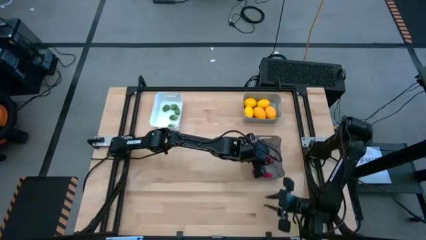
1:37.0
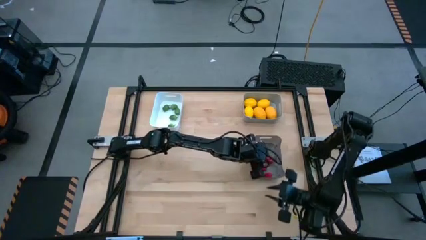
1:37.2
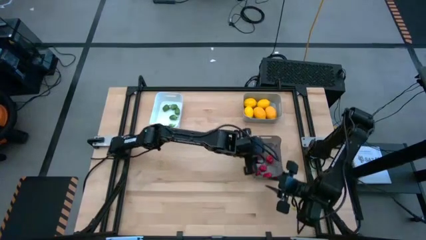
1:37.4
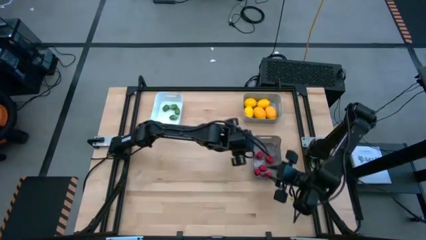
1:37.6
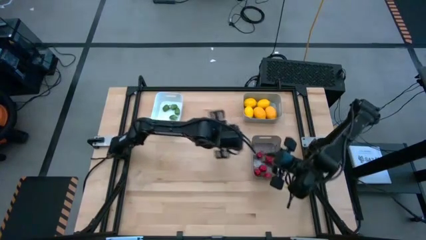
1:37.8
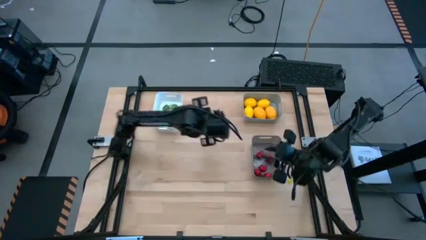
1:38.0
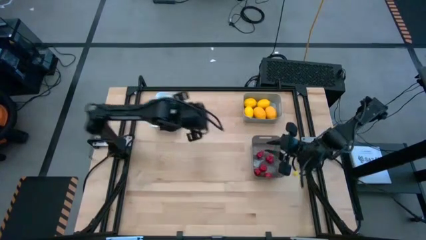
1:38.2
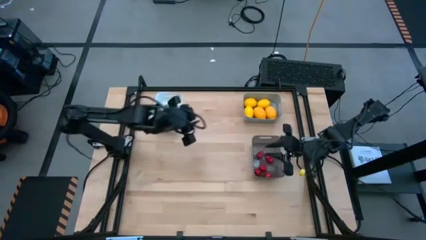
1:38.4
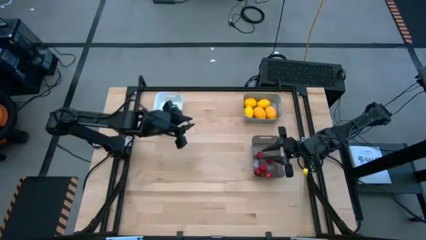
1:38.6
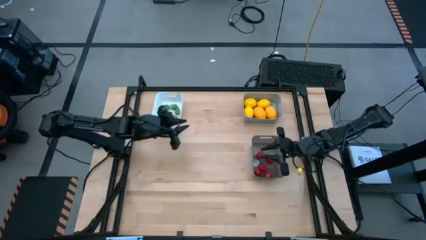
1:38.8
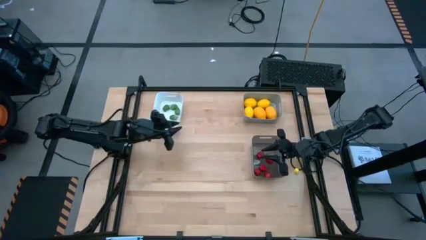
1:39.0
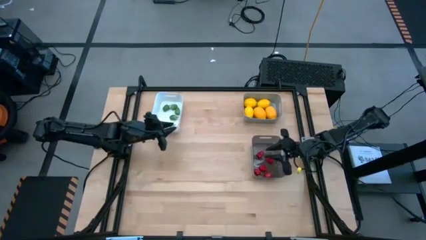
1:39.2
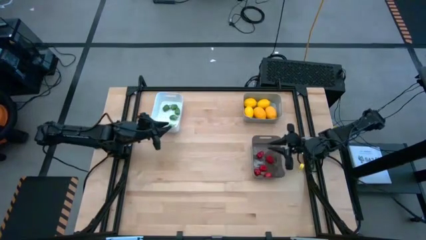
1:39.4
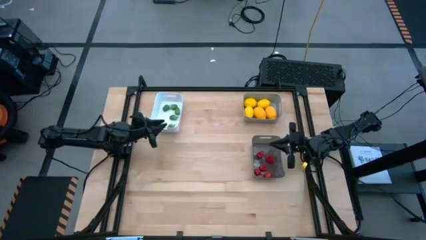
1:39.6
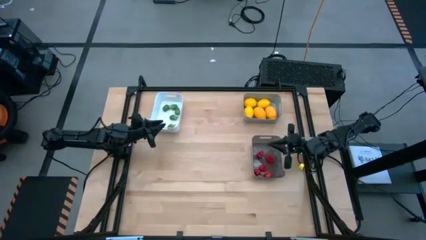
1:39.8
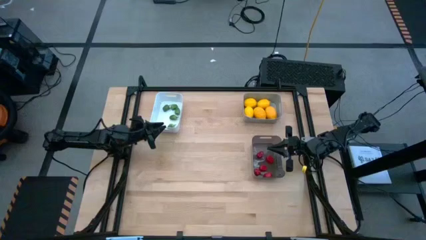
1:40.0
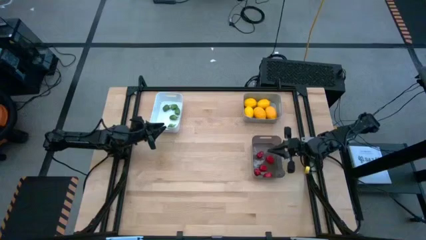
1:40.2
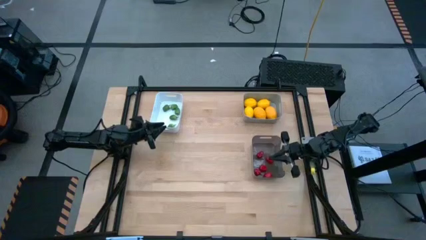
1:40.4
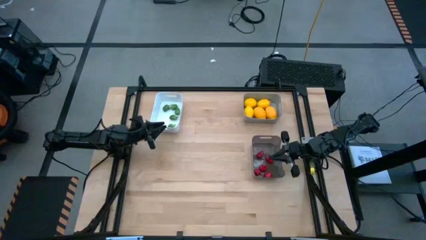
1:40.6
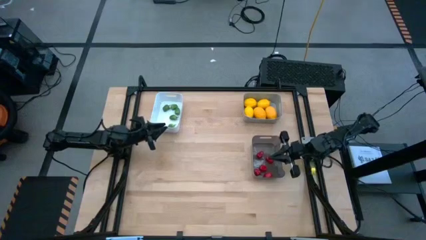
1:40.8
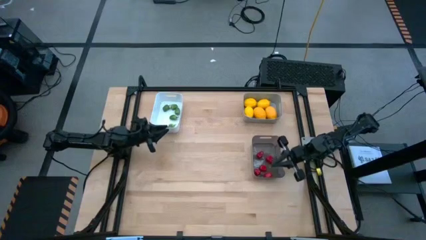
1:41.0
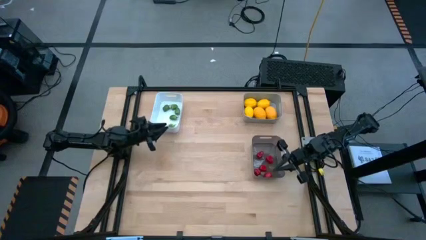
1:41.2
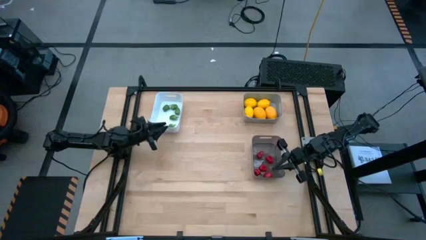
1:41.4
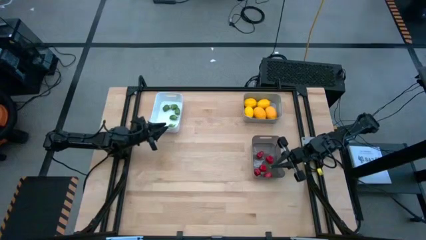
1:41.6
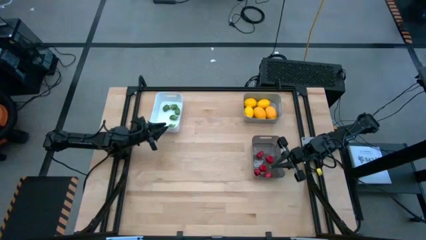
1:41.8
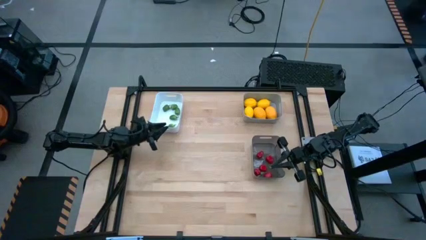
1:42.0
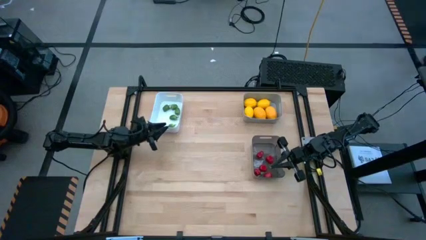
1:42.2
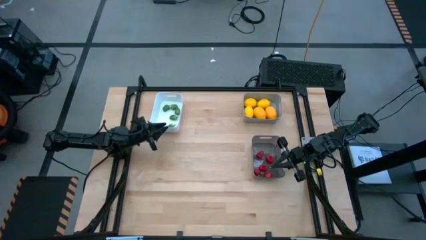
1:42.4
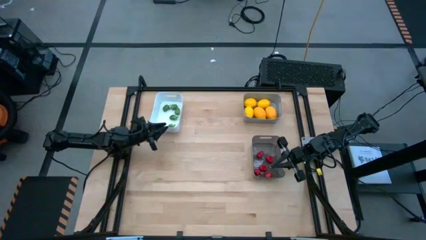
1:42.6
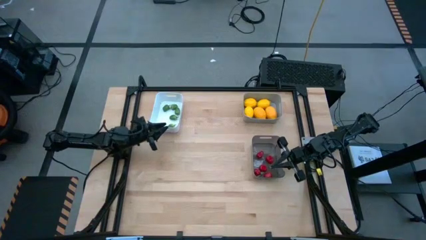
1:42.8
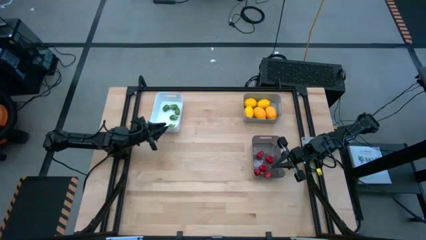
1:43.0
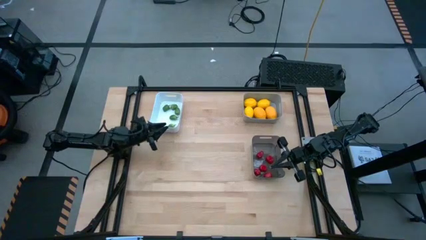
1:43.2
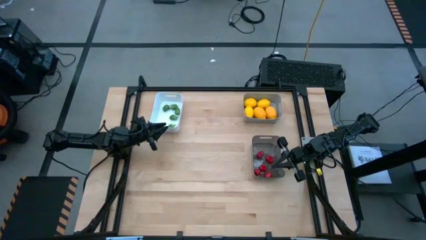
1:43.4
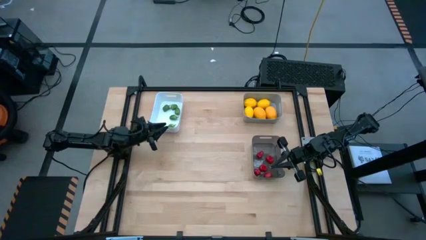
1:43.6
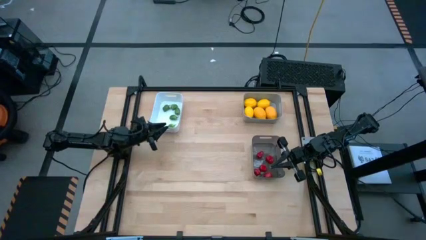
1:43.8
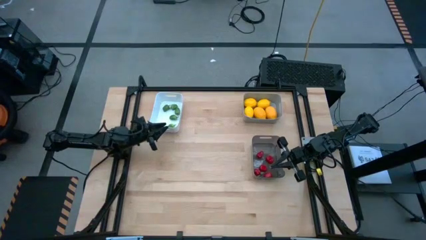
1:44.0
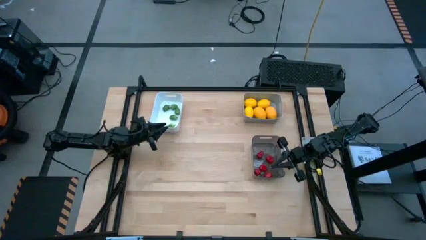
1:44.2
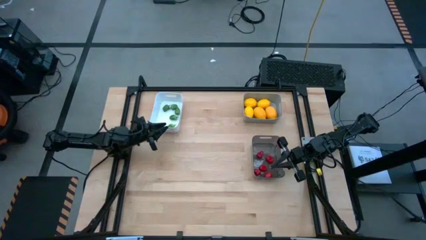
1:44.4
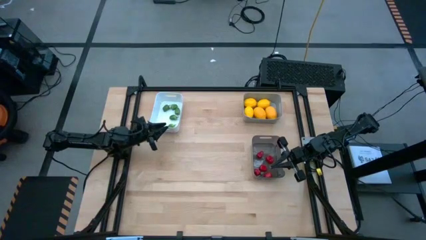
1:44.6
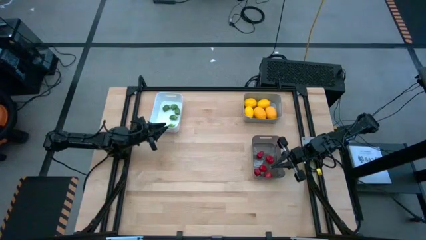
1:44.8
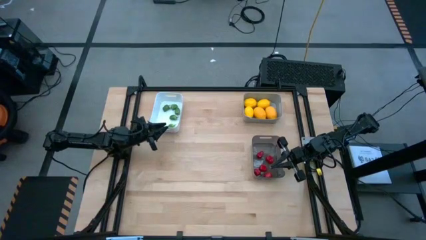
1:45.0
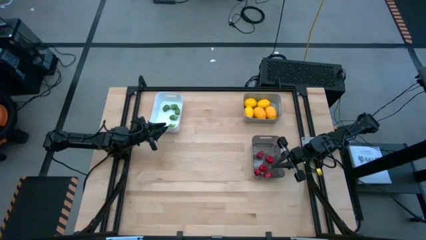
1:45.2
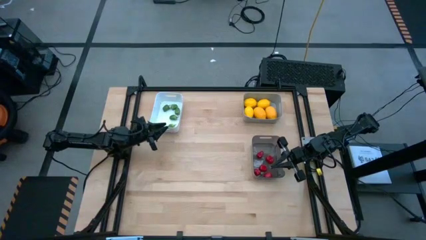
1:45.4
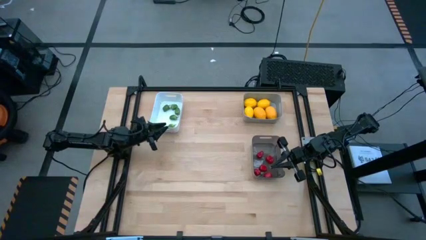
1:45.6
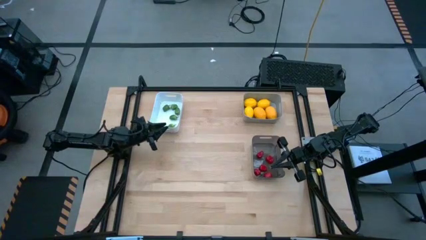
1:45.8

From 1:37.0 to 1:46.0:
Task: Sort produce into baskets
Return to Home Position

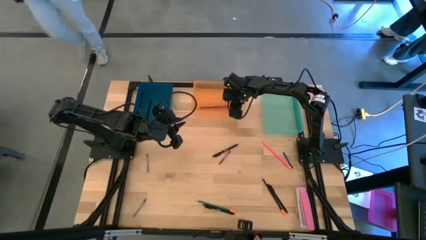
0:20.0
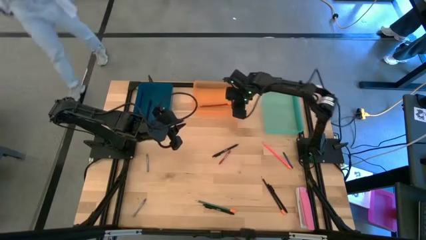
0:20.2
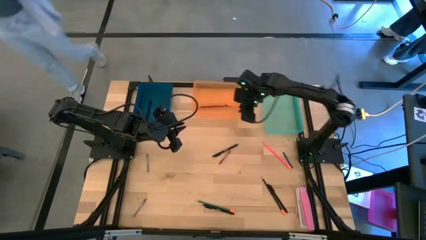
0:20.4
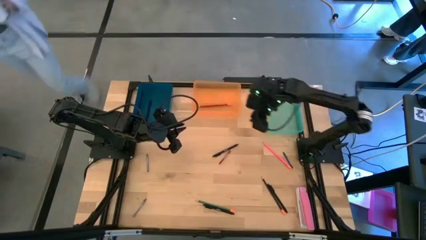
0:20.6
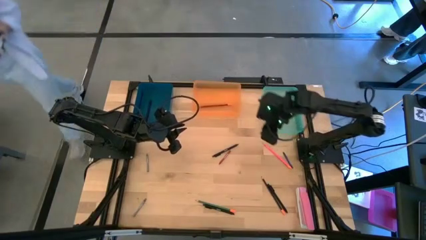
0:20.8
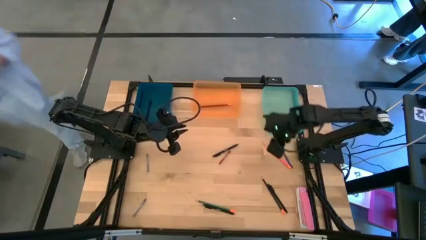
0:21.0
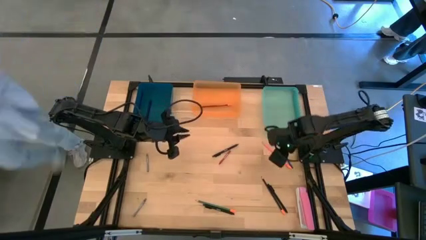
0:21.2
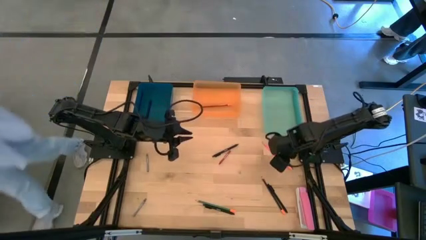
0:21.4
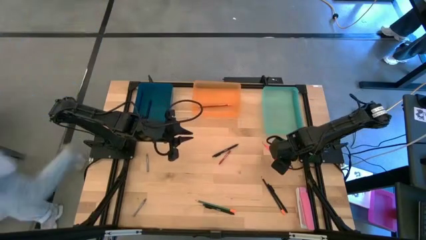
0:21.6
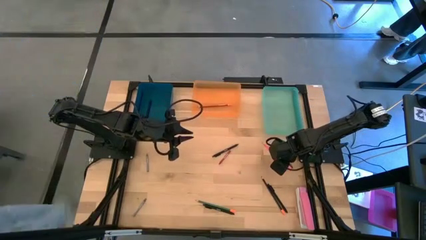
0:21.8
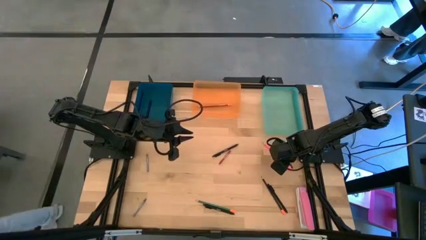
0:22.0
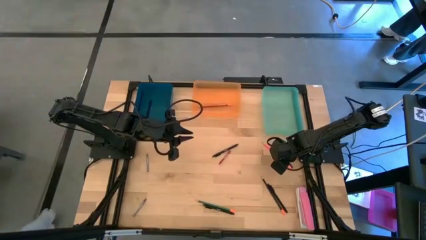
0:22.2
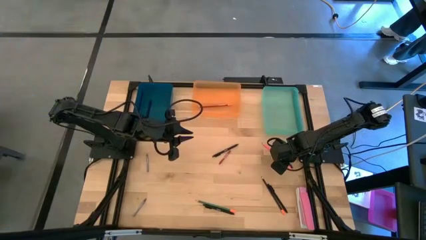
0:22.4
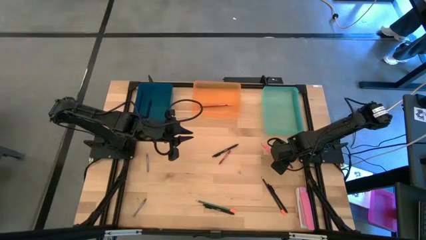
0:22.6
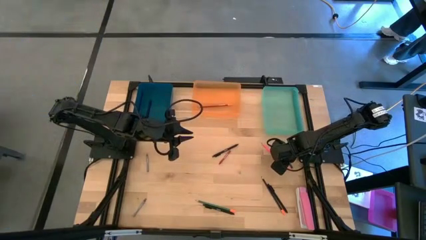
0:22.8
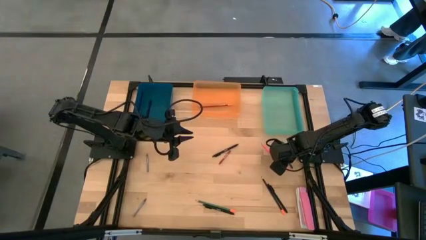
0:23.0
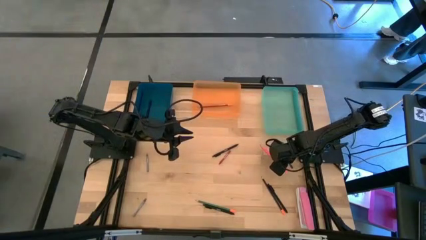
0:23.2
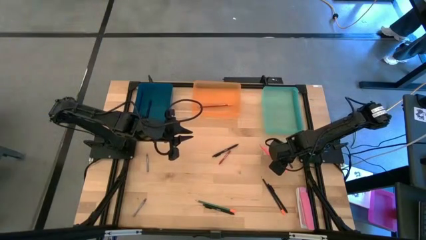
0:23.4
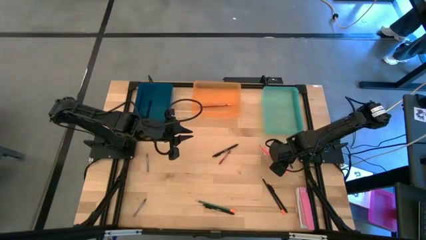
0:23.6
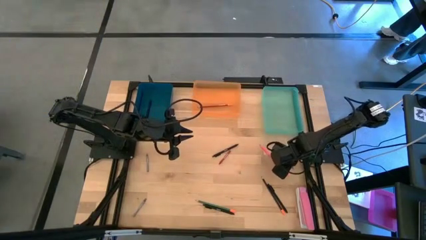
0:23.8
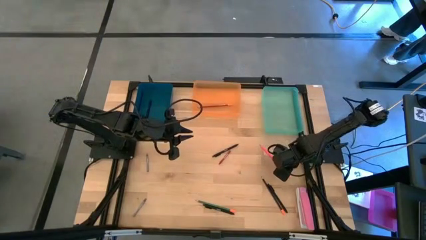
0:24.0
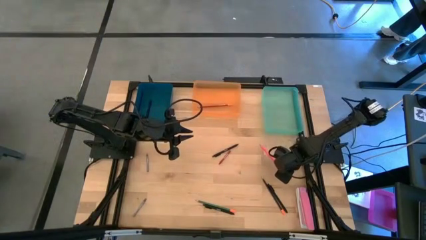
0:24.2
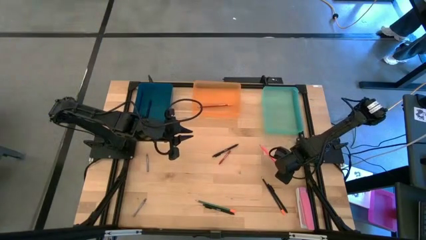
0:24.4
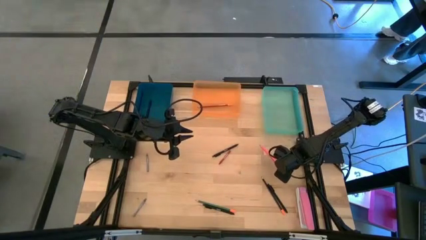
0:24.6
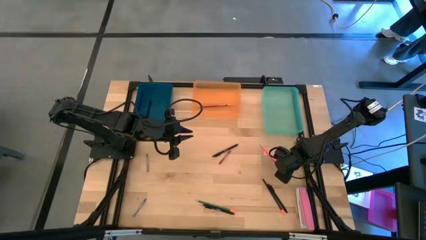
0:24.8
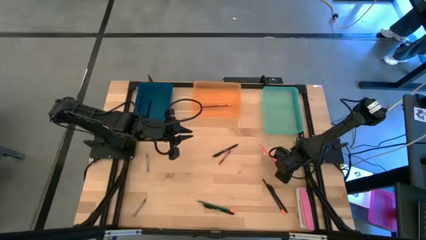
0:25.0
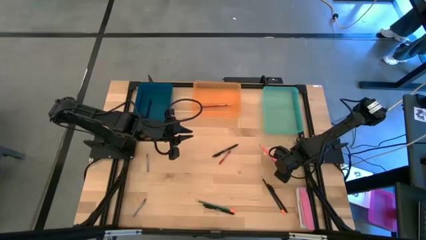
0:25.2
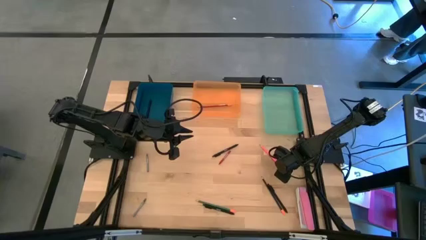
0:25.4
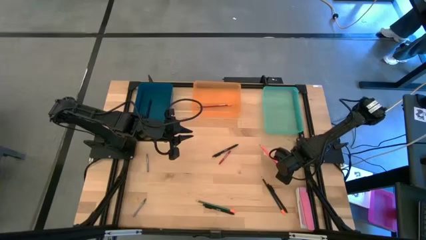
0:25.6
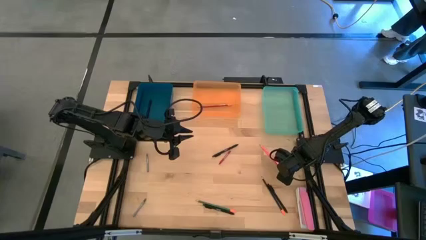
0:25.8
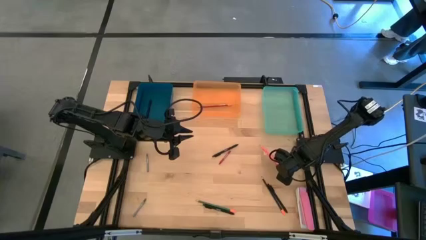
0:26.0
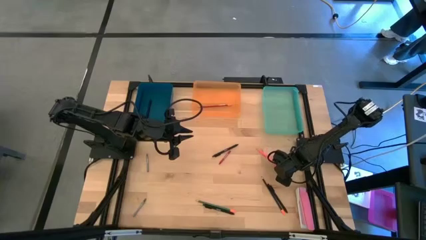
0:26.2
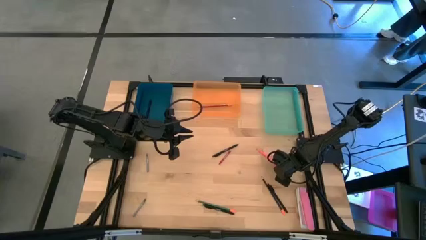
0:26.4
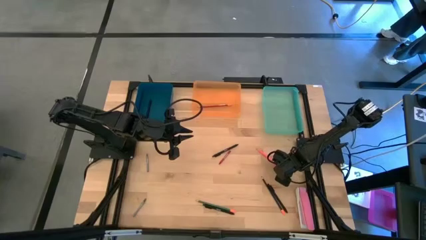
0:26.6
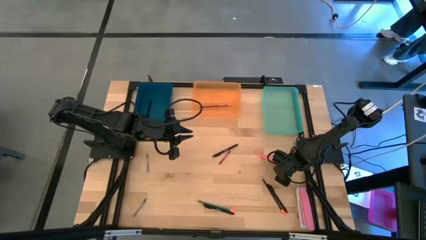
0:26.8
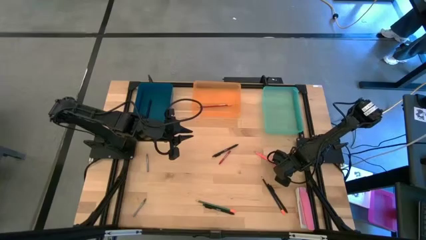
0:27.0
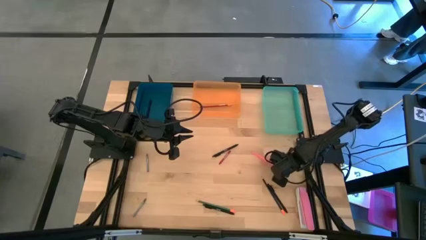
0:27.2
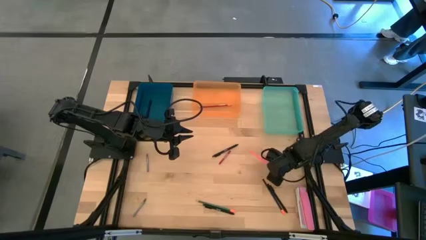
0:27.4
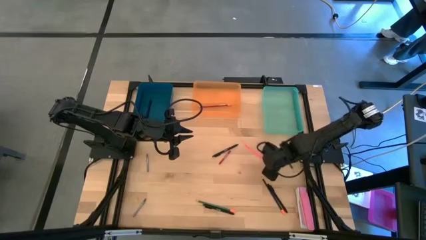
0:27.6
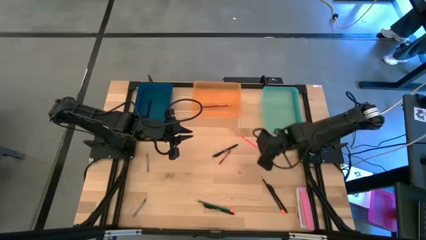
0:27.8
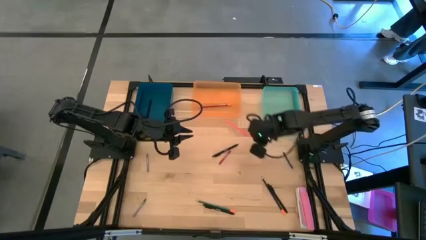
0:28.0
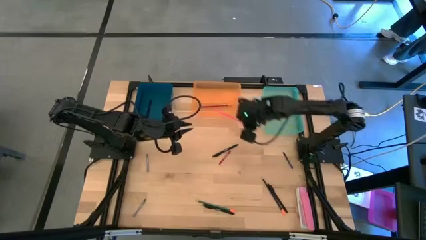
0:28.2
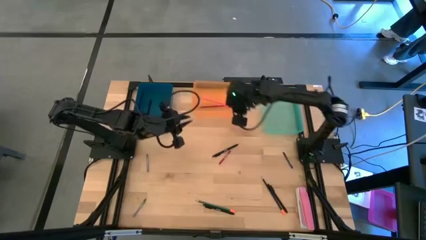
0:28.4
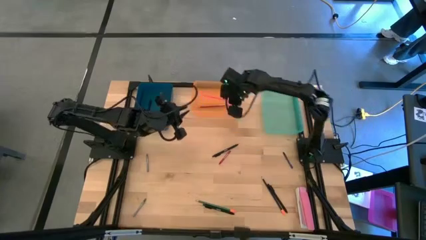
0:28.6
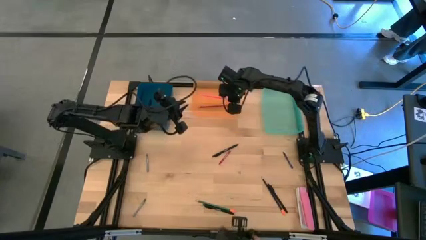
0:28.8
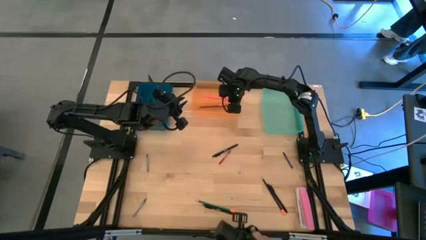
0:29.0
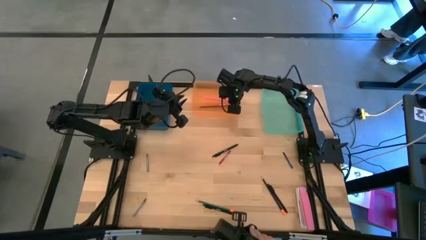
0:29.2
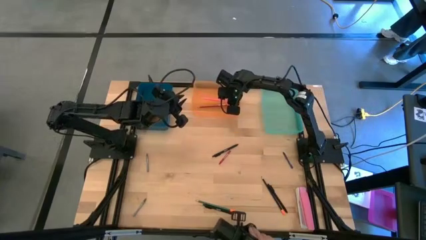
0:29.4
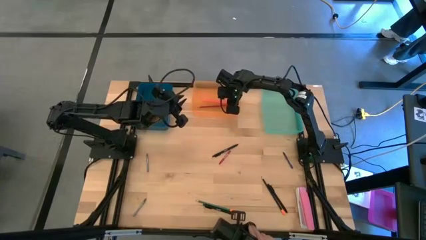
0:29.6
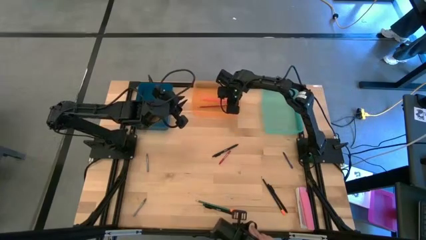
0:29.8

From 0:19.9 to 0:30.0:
Task: Sort crayons/erasers/pens/pencils in bins
Put the pink pencil into the orange bin
